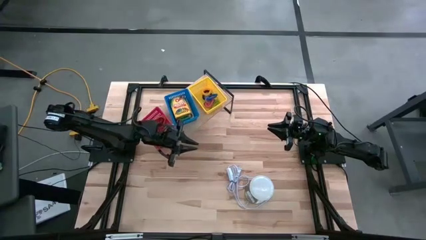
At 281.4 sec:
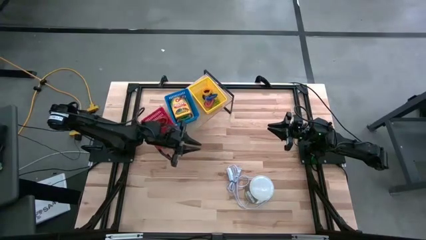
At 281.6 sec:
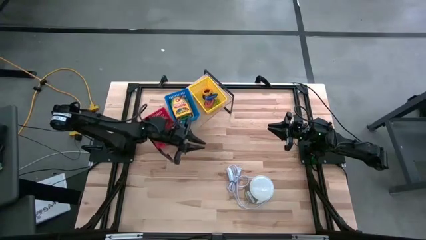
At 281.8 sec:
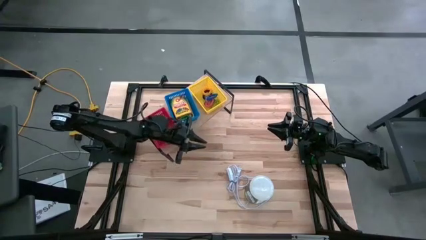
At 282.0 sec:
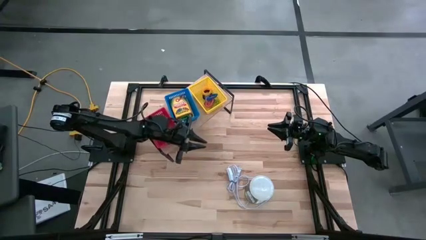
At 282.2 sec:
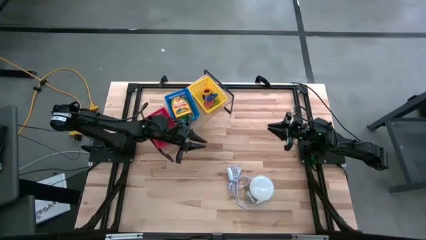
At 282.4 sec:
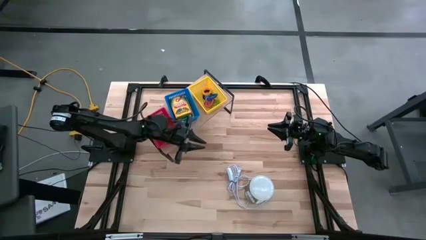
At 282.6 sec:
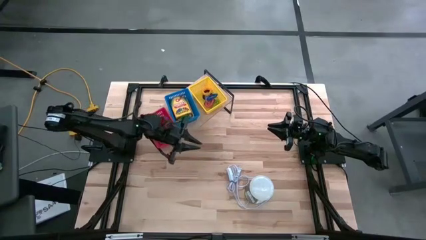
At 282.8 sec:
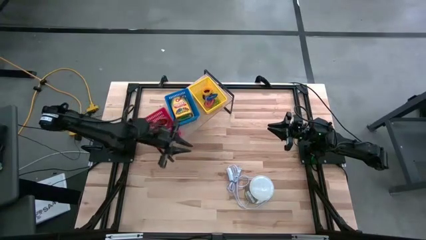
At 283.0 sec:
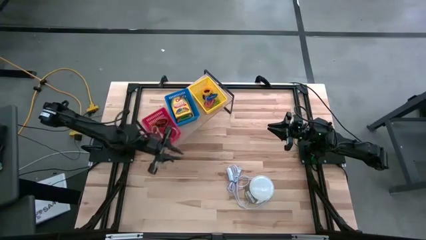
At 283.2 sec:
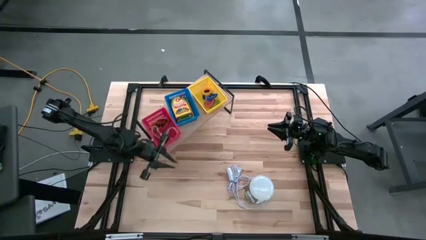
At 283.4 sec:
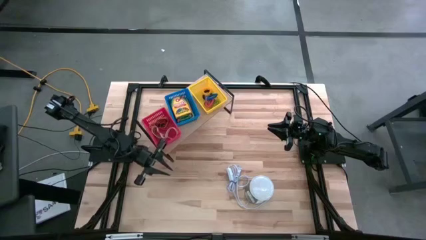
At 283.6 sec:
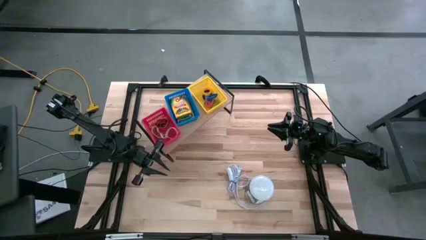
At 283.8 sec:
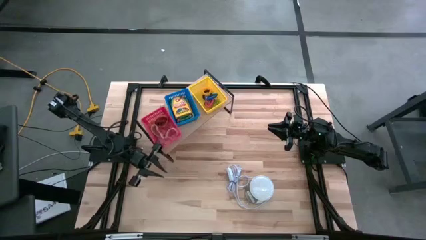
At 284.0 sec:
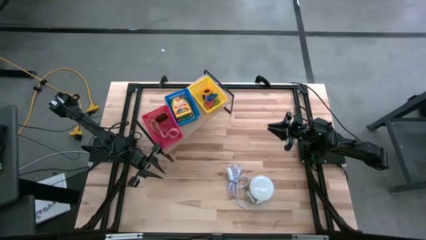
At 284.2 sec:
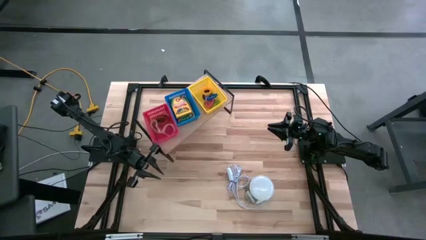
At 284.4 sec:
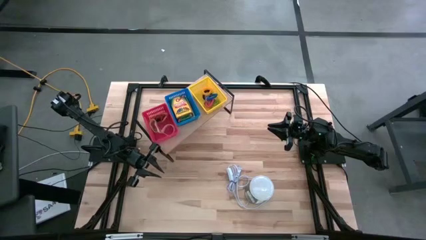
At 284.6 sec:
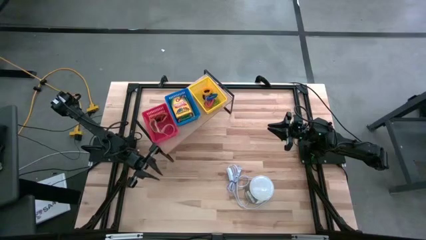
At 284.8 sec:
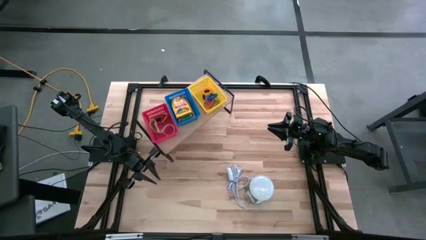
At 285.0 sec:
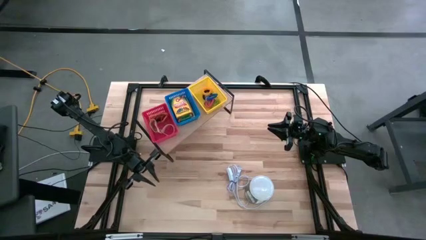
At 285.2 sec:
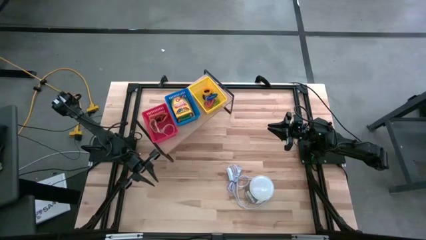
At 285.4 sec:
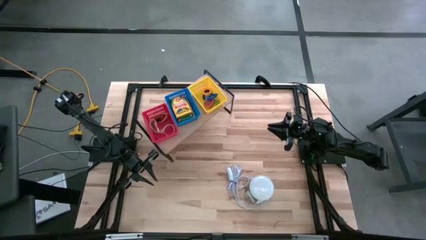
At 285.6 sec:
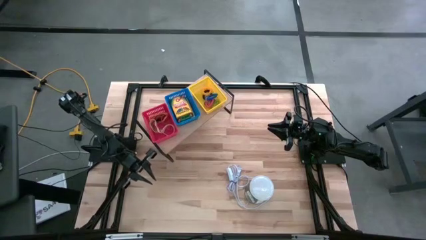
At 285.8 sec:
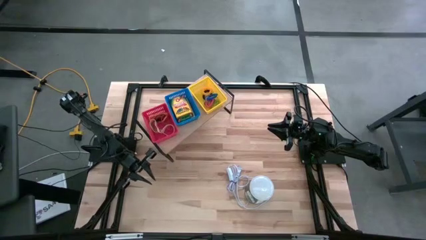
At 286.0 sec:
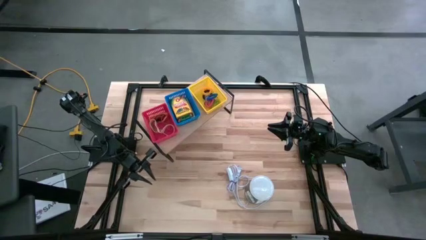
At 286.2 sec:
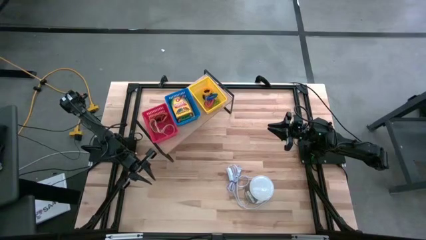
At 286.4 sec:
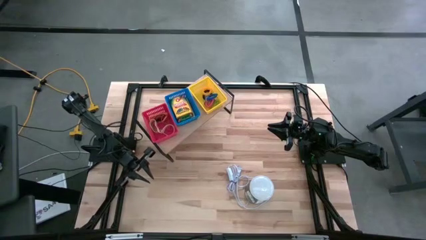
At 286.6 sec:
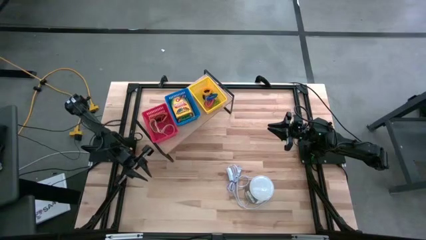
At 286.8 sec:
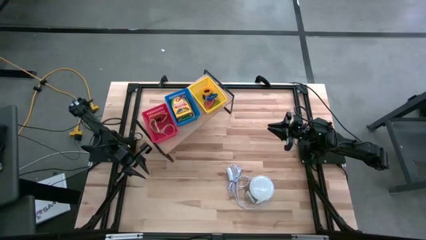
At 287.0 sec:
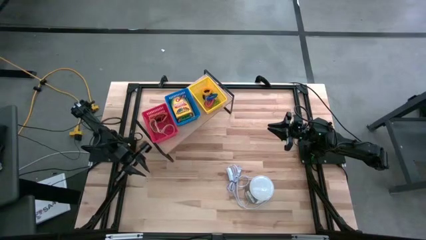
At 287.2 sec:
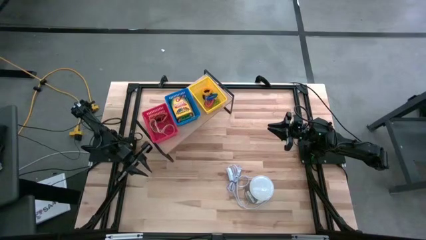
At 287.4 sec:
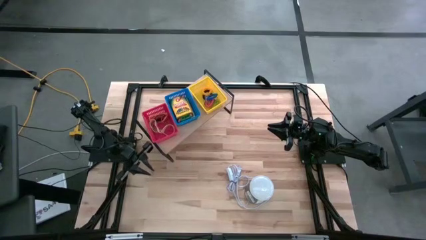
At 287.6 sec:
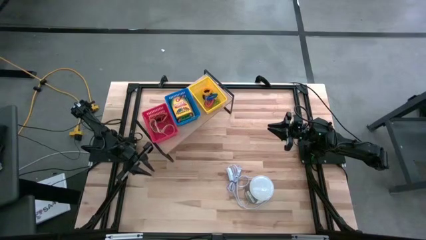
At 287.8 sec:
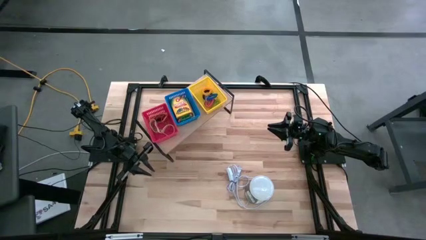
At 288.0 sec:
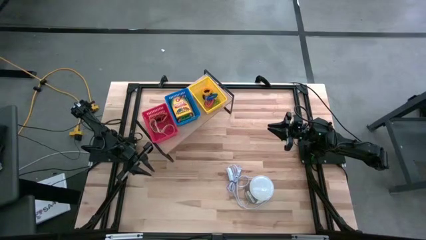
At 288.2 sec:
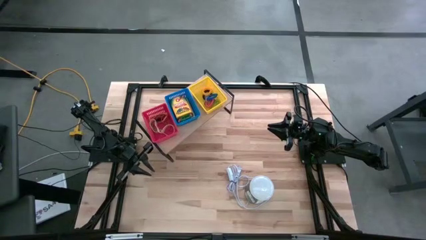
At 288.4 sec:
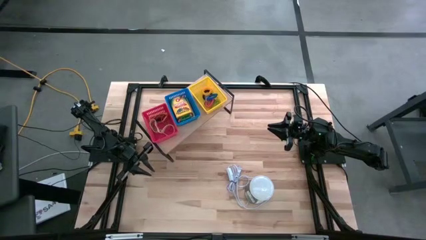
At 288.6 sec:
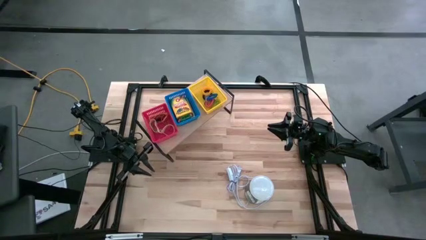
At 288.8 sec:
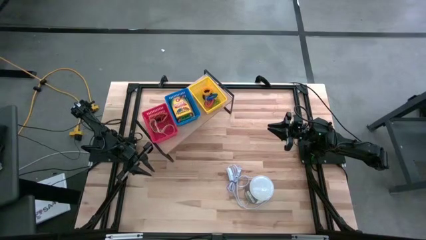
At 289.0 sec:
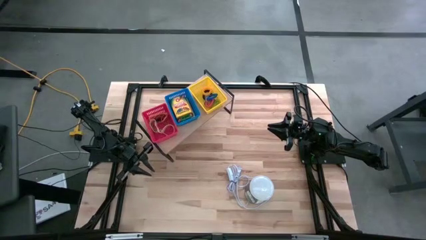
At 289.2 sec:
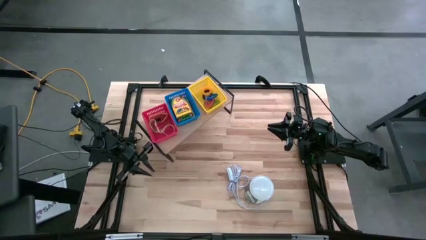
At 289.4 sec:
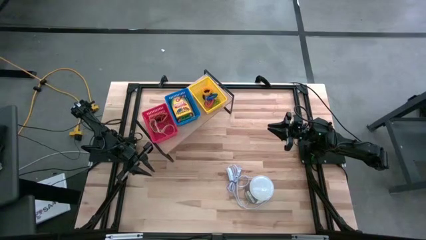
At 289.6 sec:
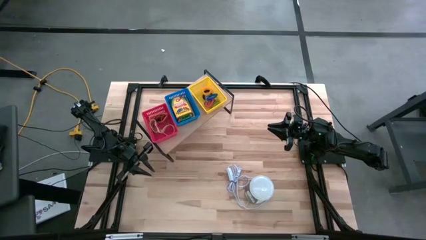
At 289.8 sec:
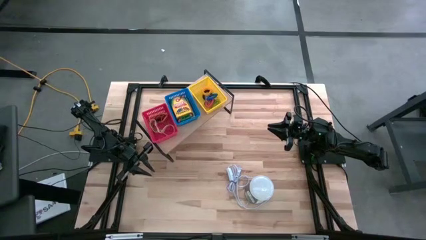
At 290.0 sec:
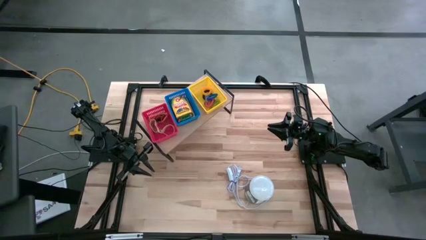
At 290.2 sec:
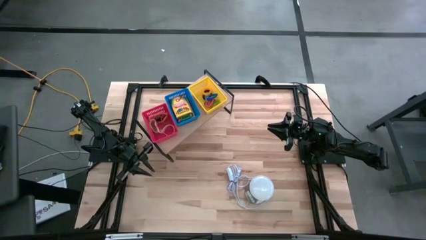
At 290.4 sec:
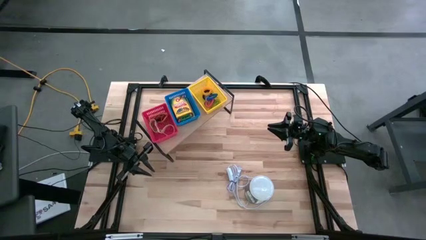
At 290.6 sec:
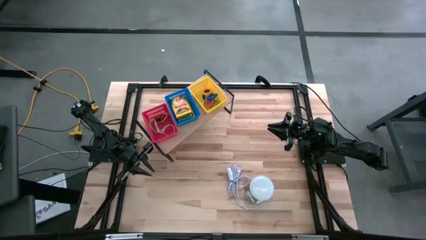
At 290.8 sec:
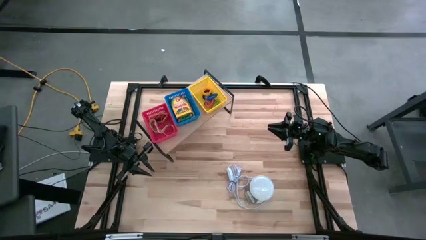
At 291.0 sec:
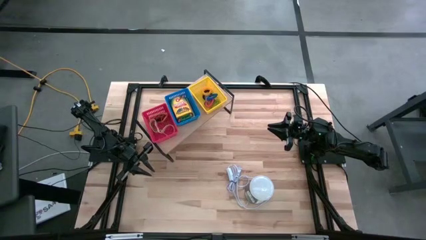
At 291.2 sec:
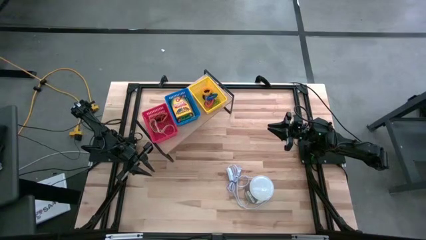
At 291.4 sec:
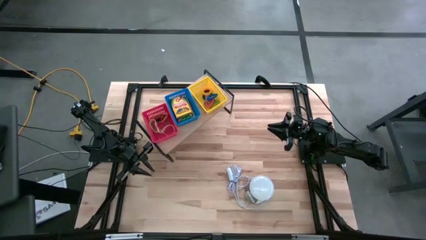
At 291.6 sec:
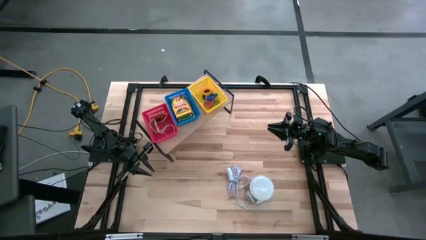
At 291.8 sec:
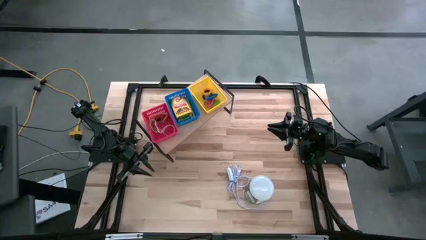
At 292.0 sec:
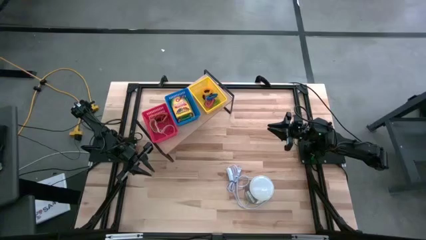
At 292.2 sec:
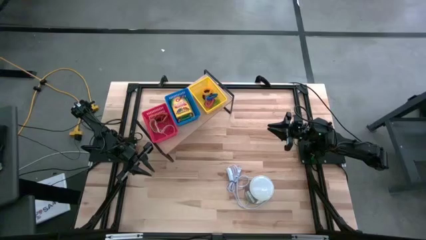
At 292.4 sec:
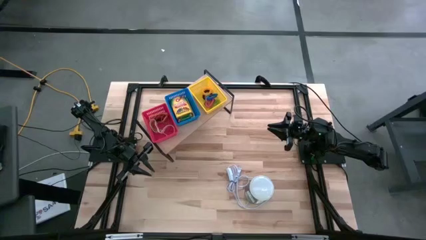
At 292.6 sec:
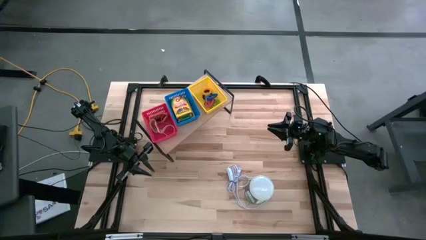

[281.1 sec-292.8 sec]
Task: Pick & Place Office Desk Supplies
Return to Home Position

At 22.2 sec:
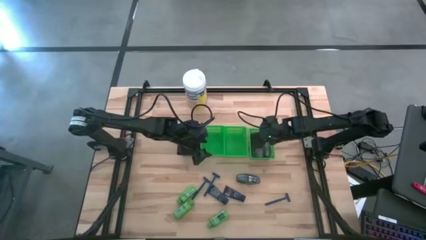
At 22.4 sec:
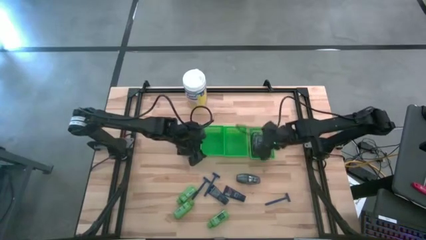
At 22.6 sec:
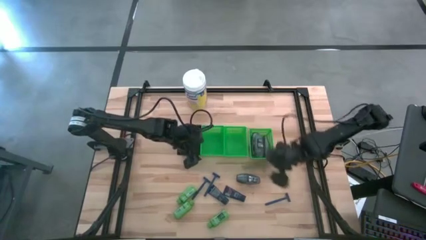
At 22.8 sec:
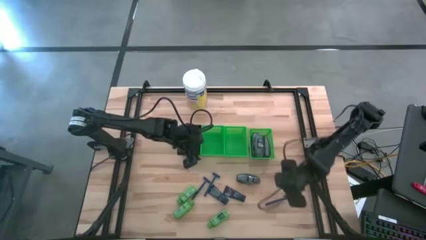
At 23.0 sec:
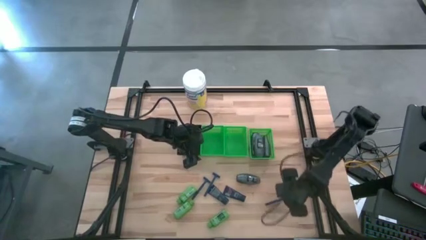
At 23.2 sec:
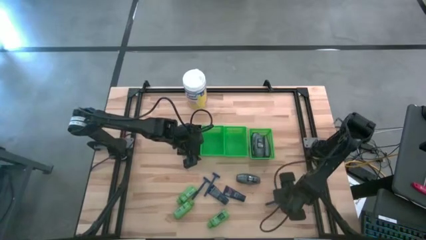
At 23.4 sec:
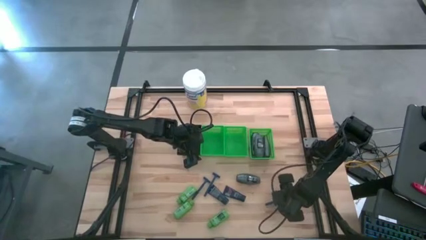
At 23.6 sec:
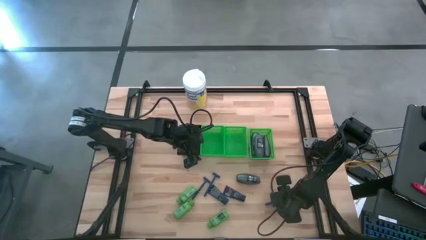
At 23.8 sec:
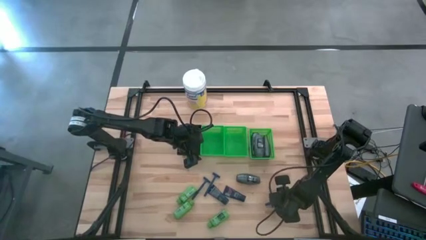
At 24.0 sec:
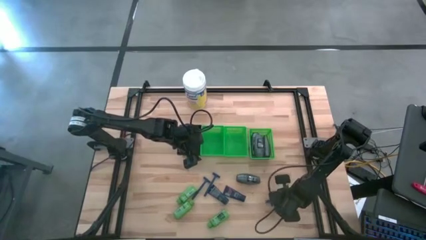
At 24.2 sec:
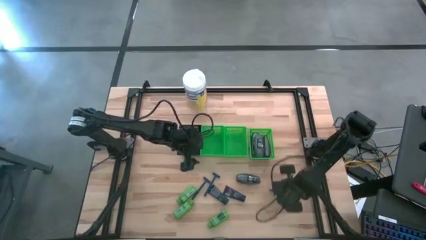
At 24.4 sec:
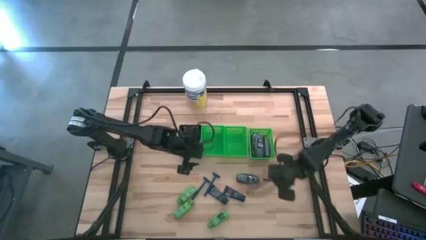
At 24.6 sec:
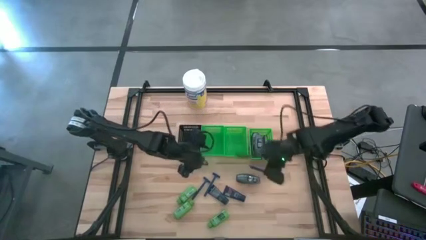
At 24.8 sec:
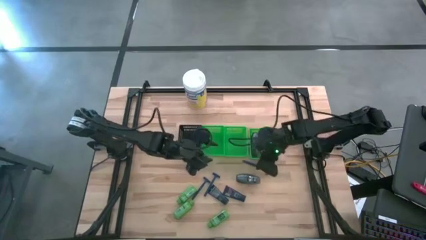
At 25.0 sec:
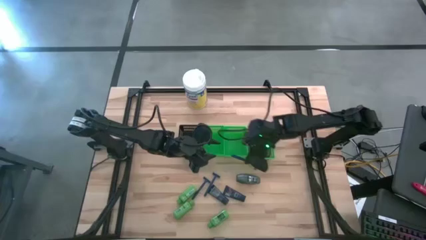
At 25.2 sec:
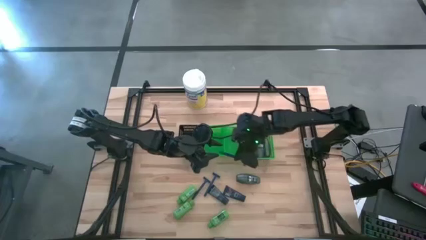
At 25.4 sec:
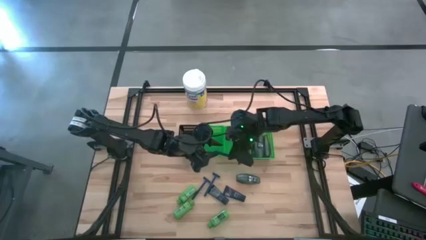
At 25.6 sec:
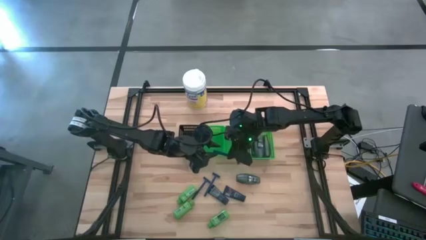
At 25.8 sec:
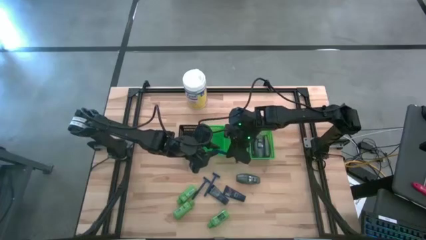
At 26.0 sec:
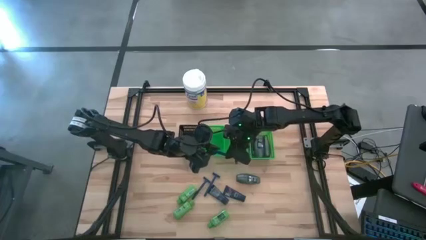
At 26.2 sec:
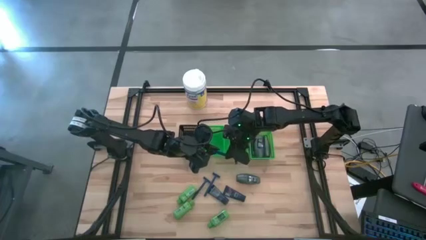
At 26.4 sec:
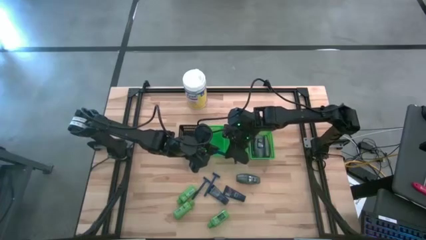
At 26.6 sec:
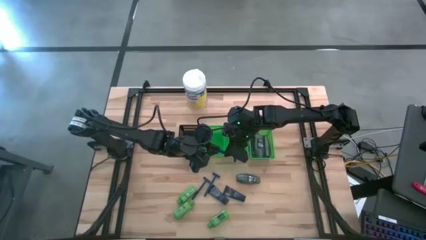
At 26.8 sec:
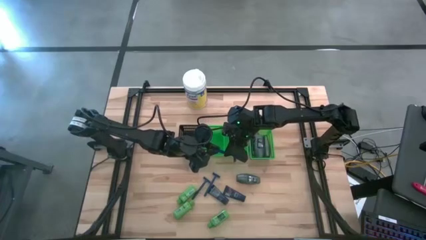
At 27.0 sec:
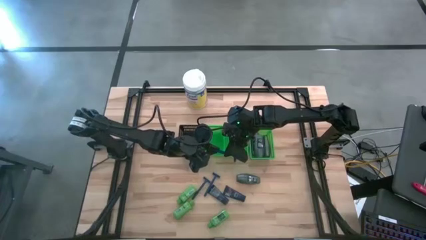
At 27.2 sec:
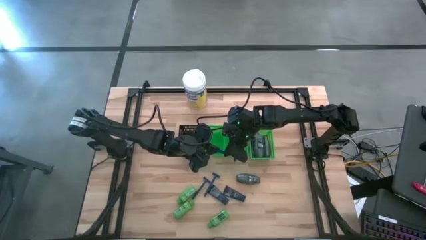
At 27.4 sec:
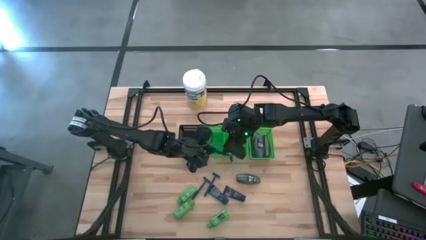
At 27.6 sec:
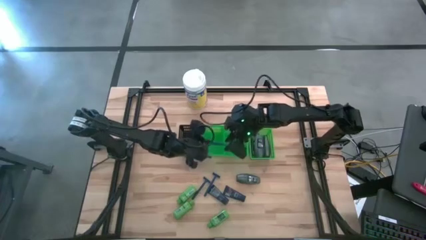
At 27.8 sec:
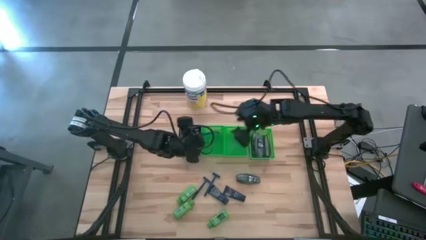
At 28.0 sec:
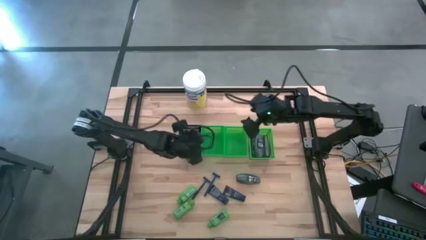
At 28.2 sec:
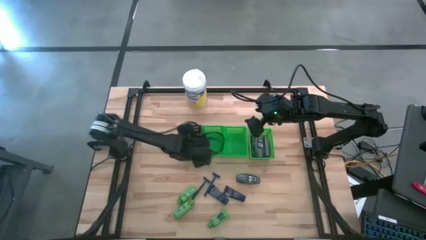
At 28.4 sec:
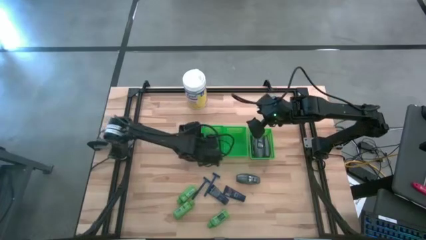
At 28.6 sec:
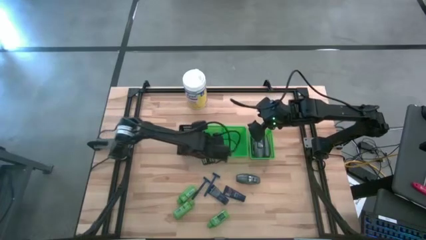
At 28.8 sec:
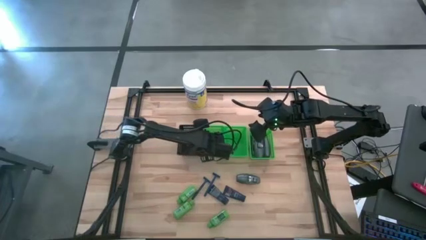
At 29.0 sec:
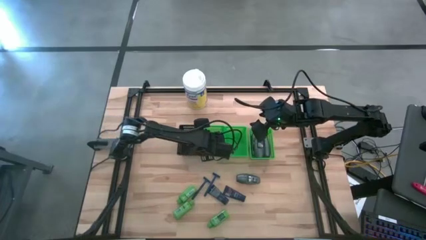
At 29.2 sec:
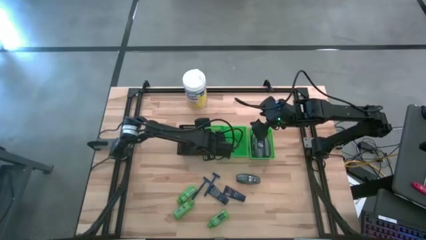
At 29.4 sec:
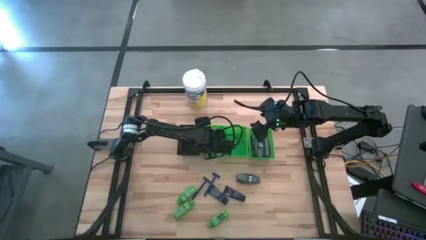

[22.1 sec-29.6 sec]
Task: Pick & Place Travel size toiletries
Put the razor into the left green bin
